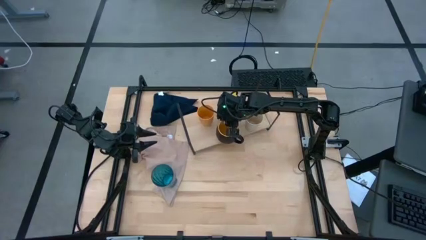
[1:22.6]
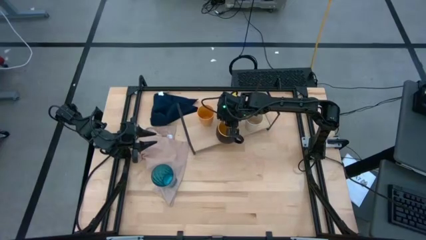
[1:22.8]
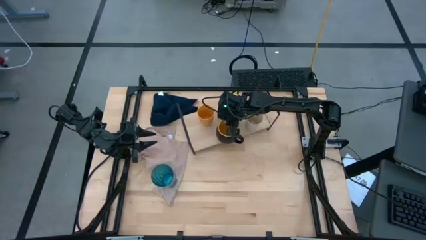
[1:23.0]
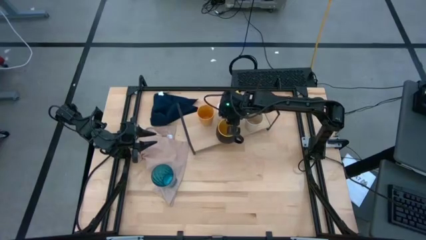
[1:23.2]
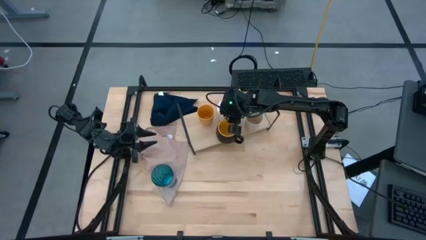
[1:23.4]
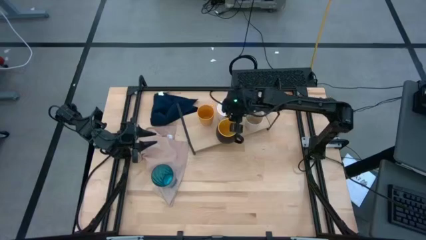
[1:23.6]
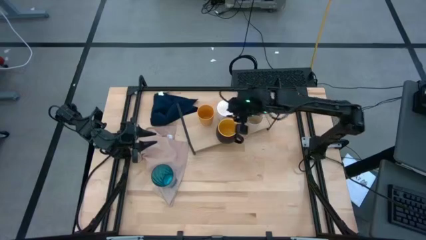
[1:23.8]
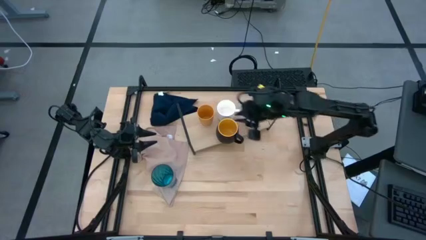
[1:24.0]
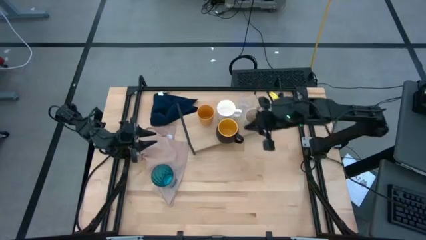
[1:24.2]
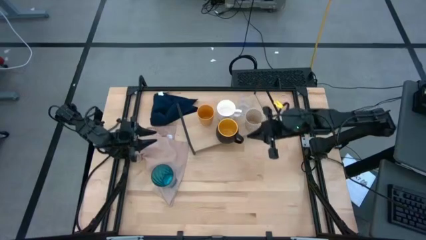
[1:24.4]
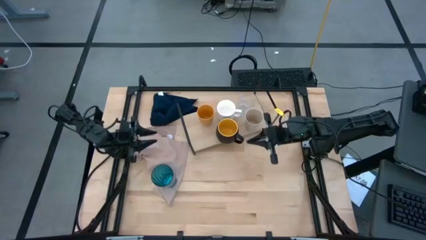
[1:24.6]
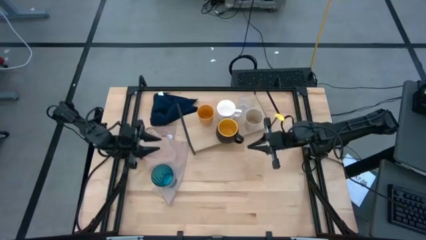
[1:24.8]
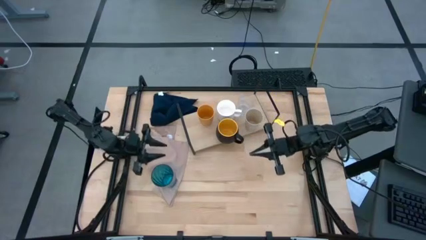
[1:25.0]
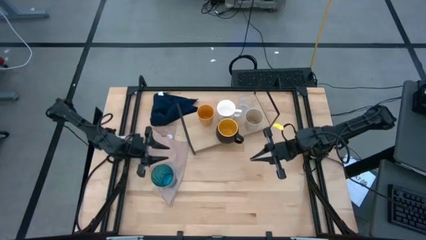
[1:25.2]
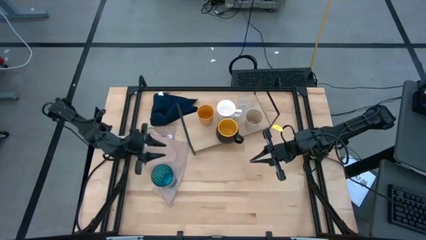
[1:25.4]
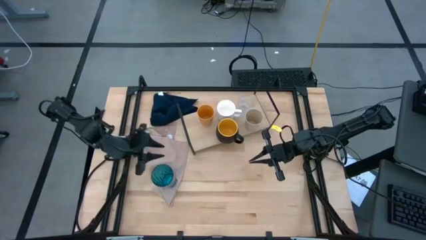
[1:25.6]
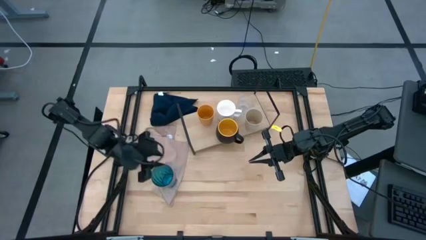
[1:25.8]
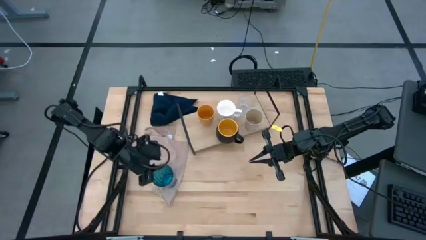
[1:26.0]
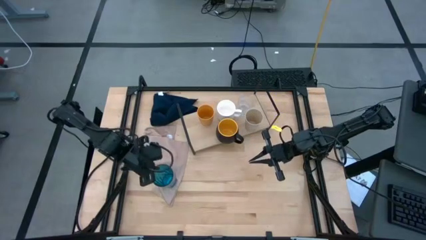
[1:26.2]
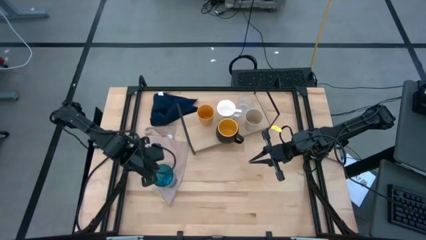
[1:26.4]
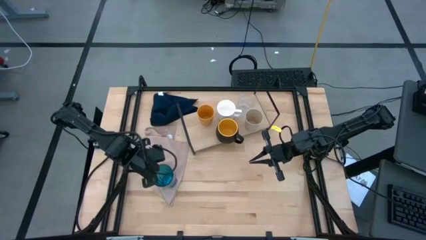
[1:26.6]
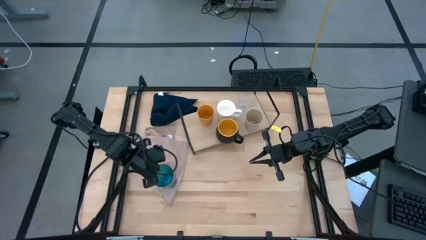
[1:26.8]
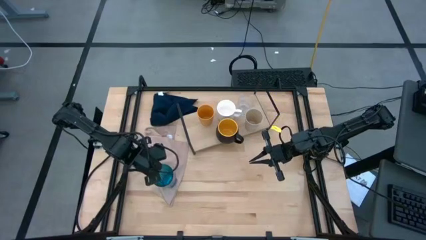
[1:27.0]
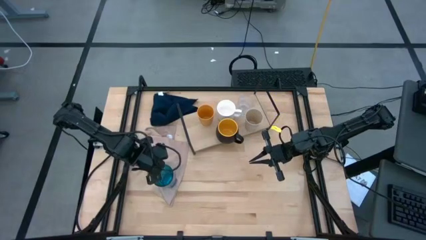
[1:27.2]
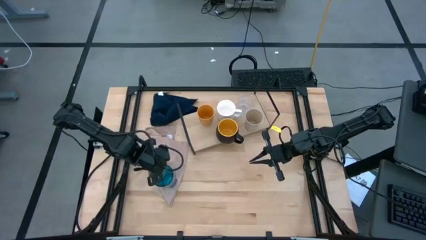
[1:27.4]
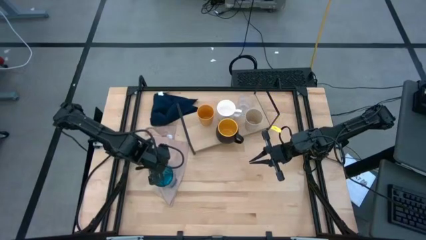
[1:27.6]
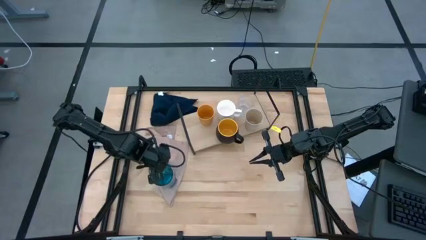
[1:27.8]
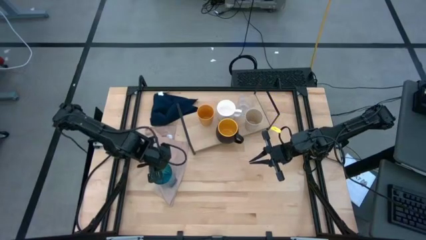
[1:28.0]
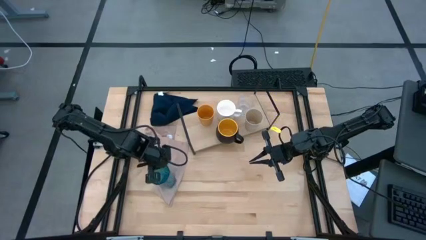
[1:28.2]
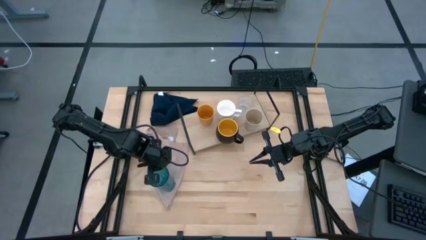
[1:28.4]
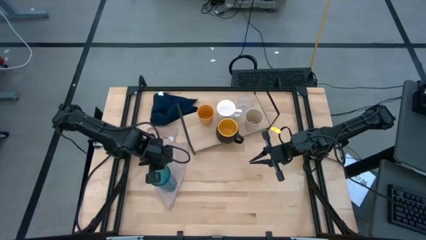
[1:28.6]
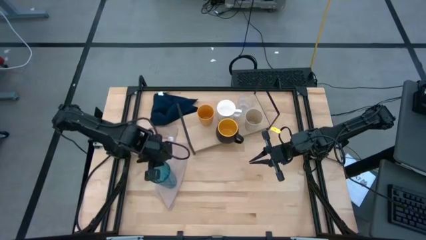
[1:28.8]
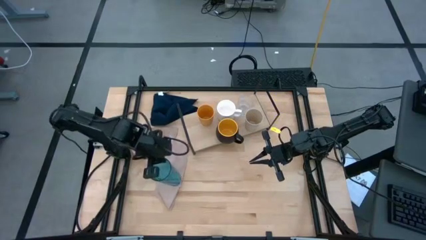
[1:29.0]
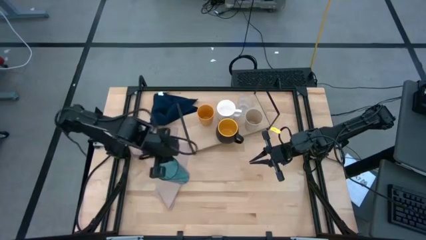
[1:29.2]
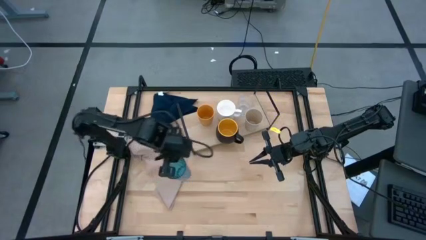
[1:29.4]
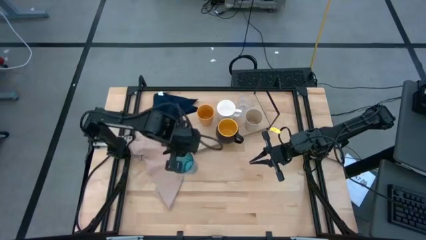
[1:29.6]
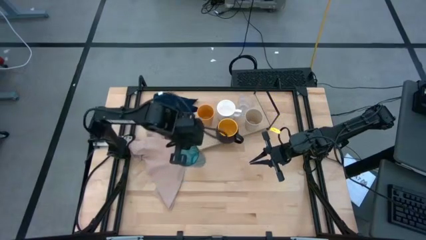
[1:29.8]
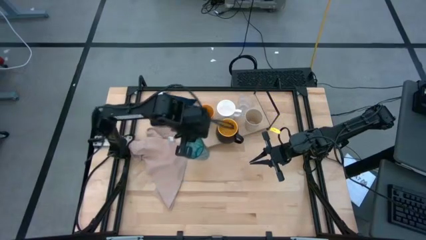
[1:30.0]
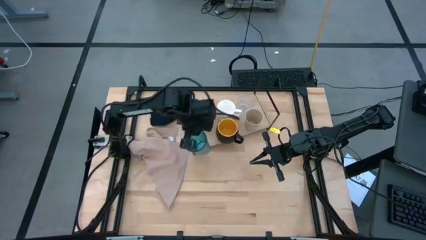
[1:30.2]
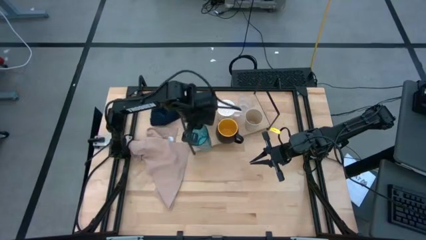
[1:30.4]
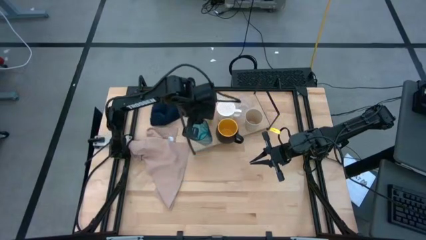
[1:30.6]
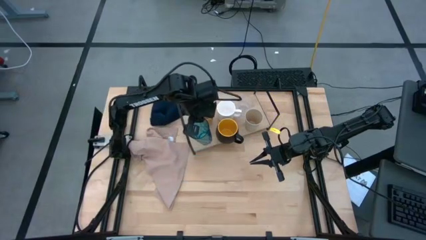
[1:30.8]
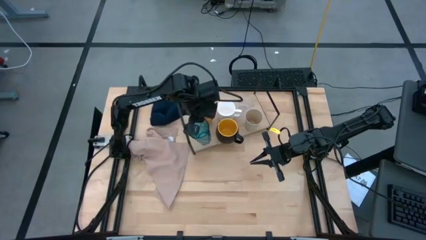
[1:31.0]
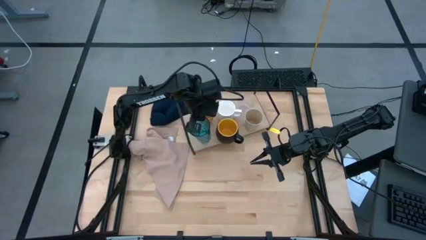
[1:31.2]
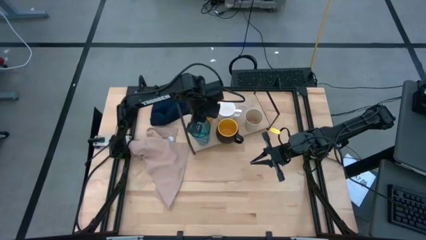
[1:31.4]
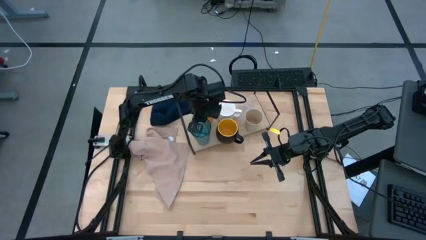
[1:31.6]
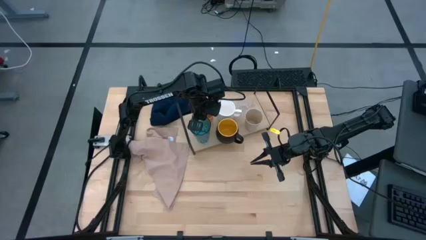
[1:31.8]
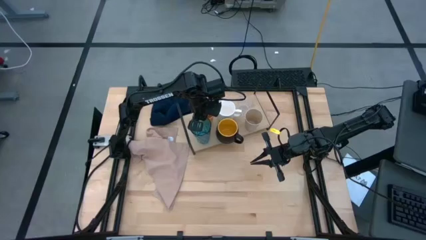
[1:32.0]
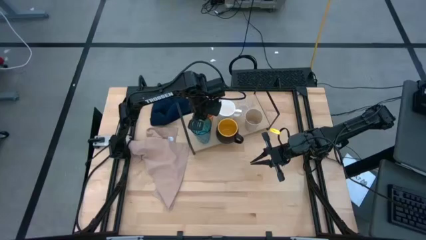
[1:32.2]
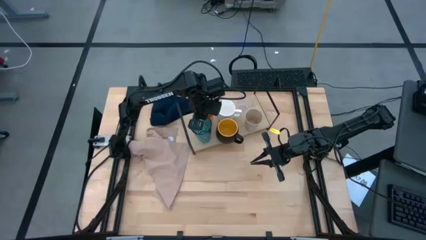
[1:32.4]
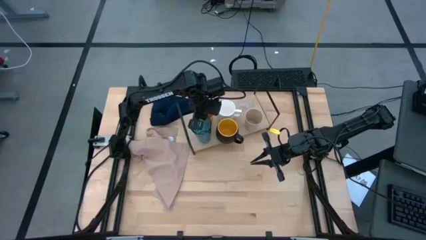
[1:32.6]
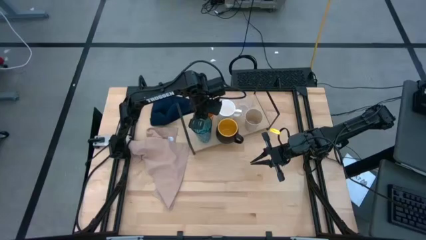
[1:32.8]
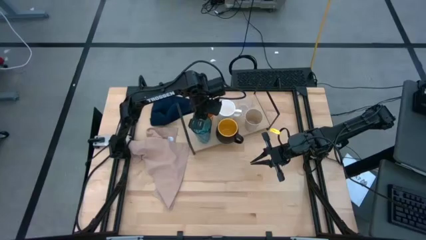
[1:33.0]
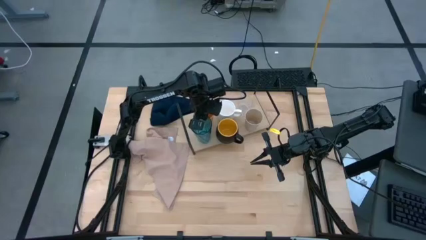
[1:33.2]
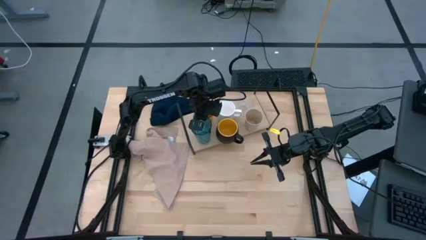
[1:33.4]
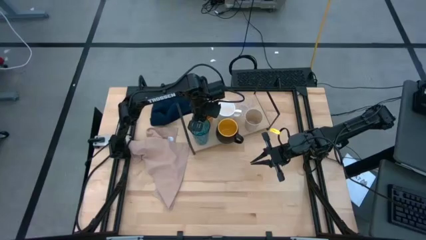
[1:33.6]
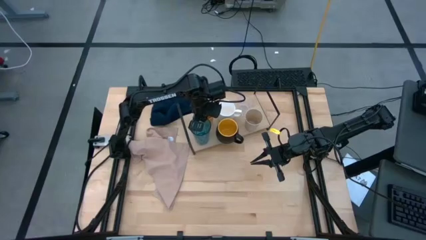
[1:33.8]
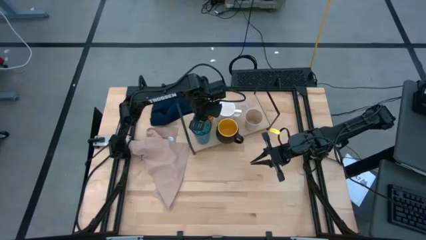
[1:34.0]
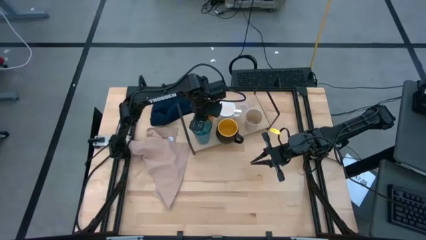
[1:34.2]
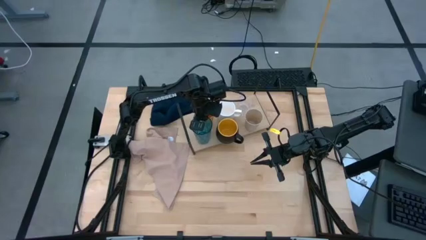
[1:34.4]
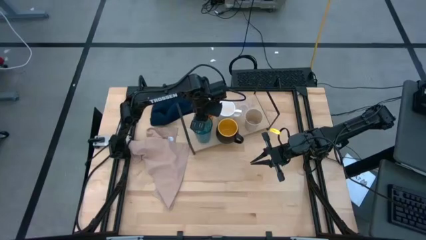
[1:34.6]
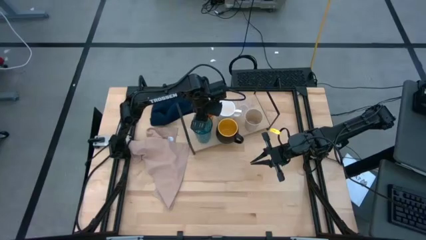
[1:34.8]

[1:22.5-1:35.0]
Task: Stack small to large cups/mugs on shelf
Put the blue cup on the shelf aligned with the other yellow cup
